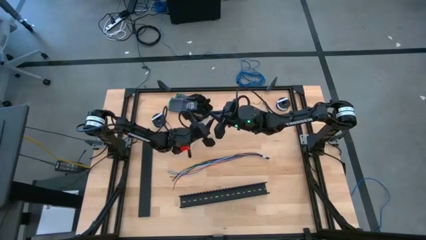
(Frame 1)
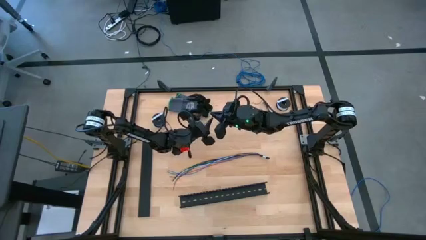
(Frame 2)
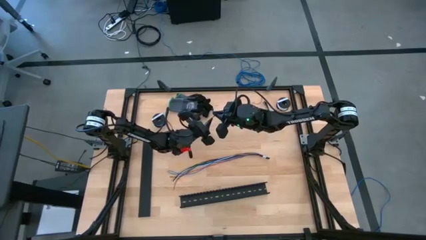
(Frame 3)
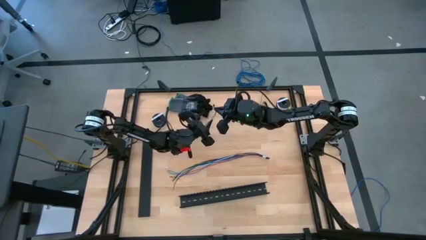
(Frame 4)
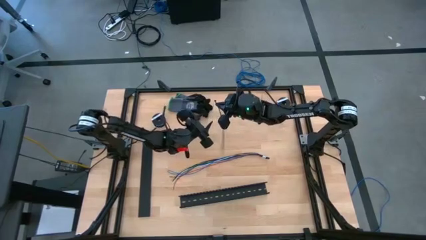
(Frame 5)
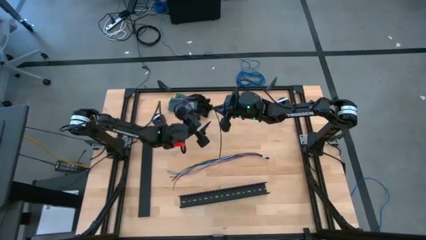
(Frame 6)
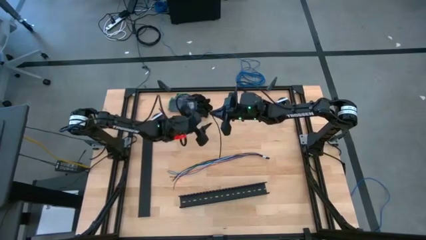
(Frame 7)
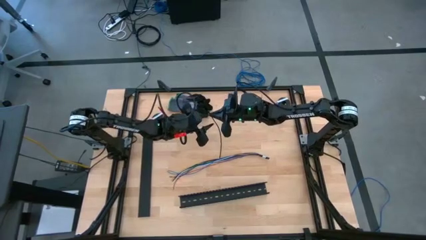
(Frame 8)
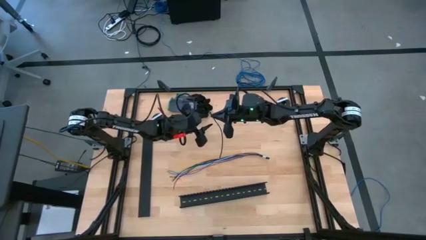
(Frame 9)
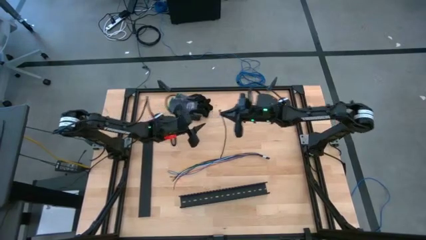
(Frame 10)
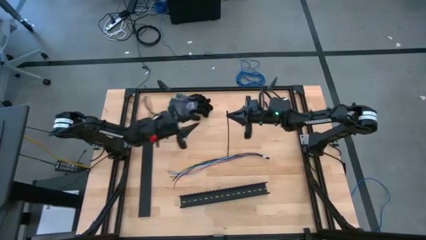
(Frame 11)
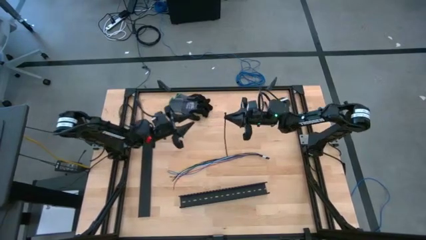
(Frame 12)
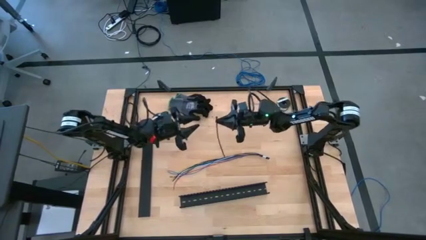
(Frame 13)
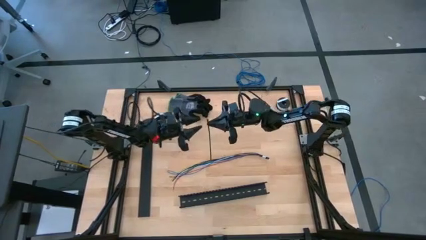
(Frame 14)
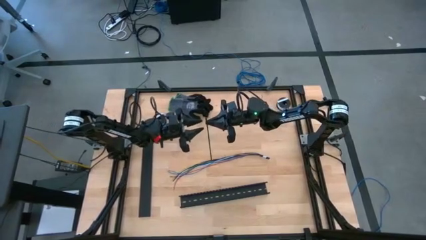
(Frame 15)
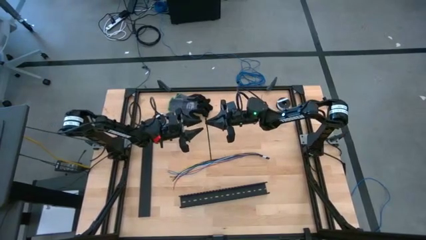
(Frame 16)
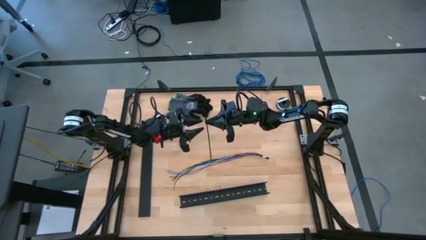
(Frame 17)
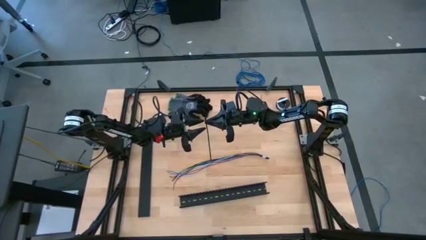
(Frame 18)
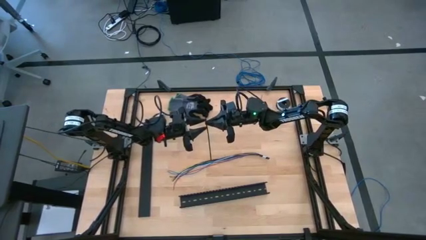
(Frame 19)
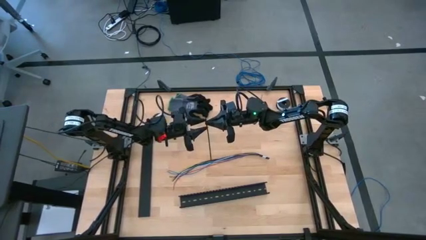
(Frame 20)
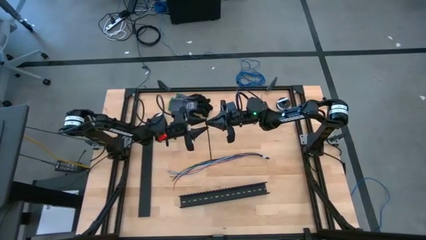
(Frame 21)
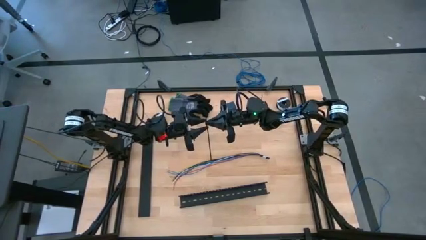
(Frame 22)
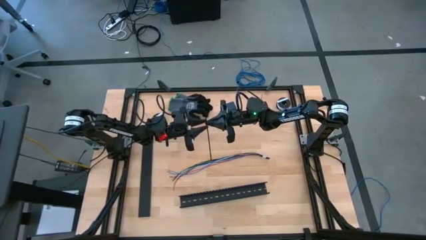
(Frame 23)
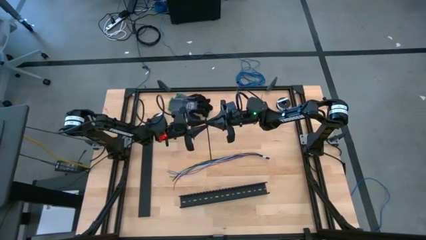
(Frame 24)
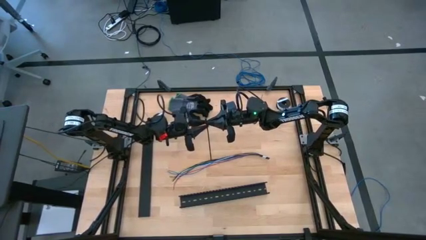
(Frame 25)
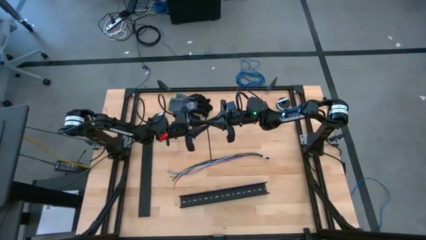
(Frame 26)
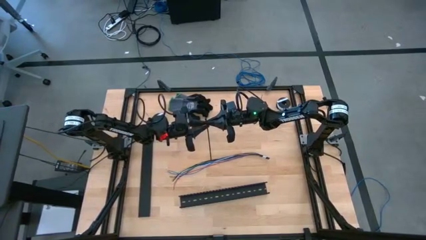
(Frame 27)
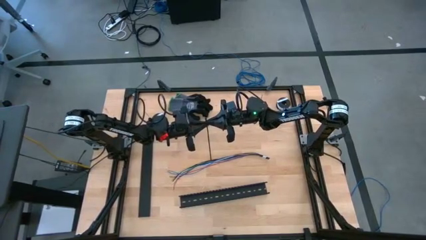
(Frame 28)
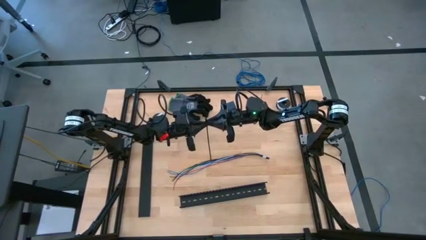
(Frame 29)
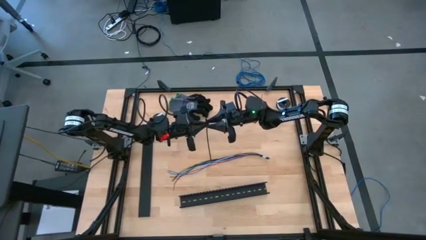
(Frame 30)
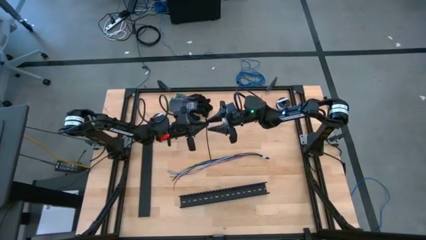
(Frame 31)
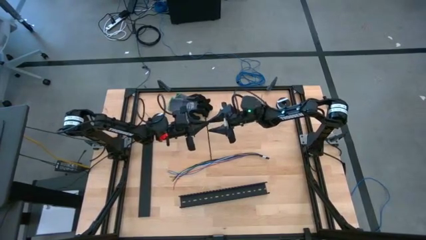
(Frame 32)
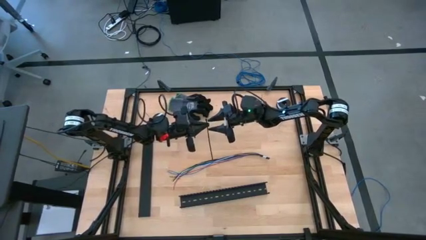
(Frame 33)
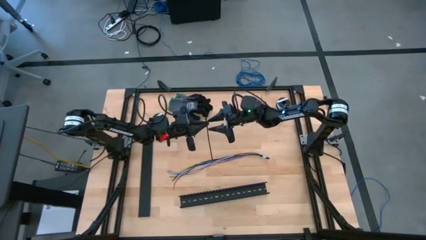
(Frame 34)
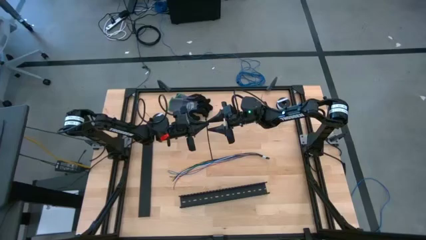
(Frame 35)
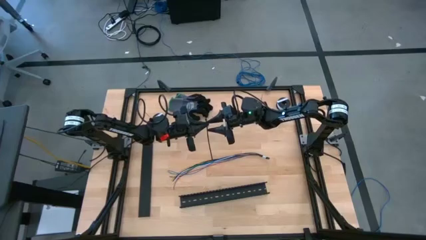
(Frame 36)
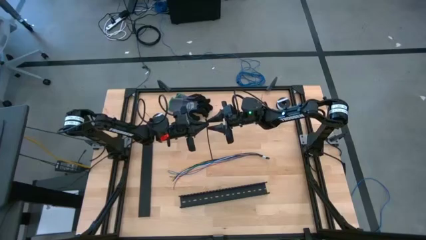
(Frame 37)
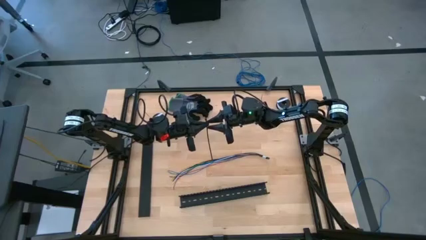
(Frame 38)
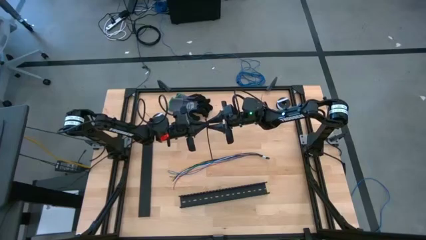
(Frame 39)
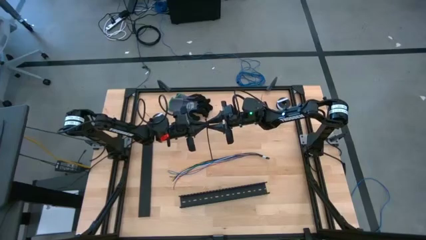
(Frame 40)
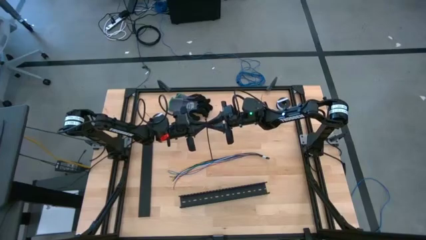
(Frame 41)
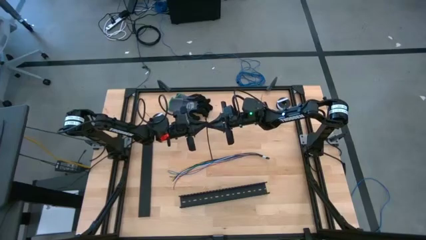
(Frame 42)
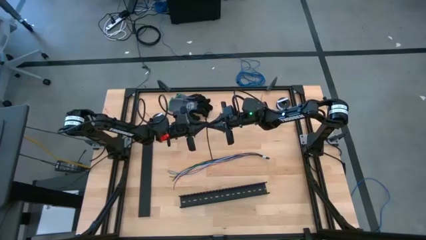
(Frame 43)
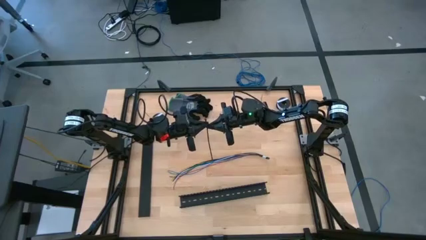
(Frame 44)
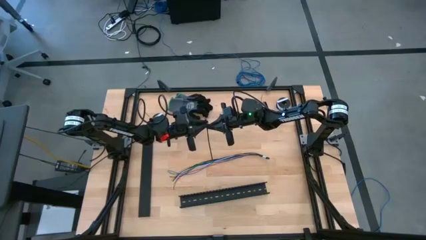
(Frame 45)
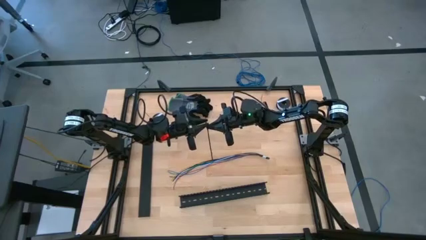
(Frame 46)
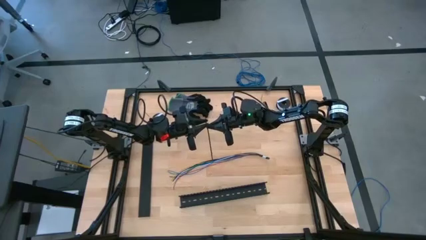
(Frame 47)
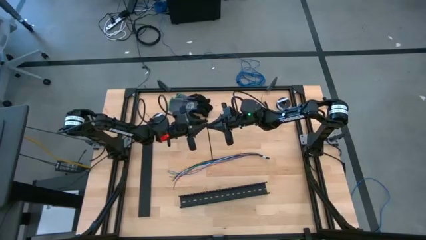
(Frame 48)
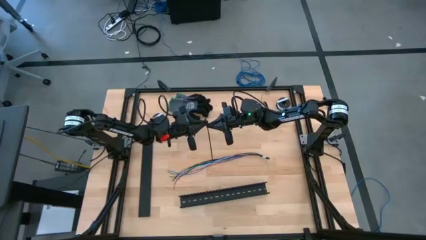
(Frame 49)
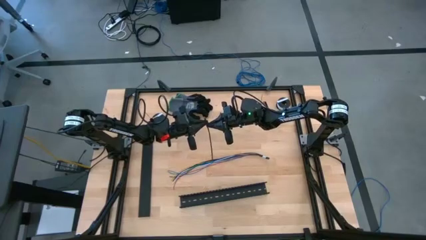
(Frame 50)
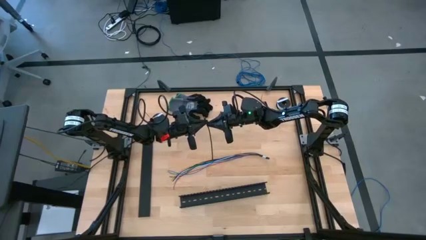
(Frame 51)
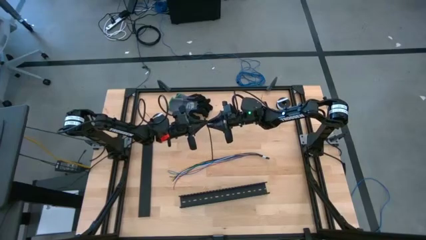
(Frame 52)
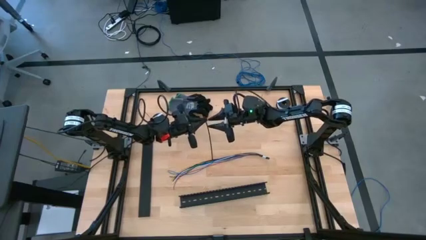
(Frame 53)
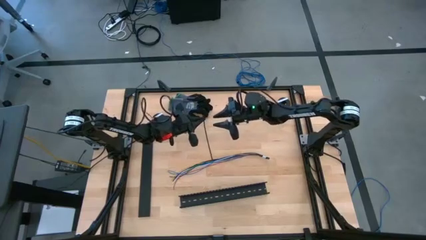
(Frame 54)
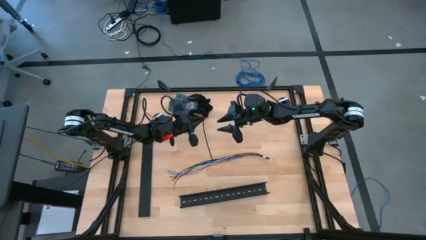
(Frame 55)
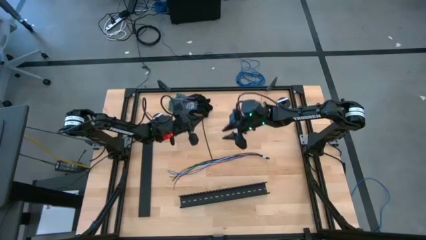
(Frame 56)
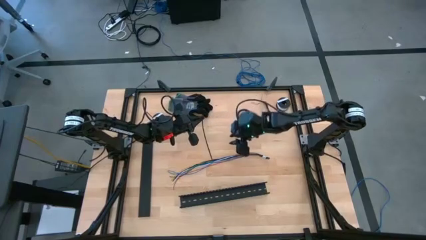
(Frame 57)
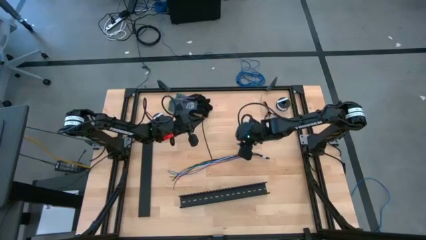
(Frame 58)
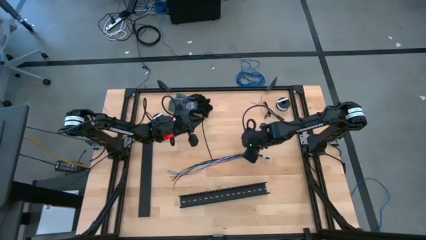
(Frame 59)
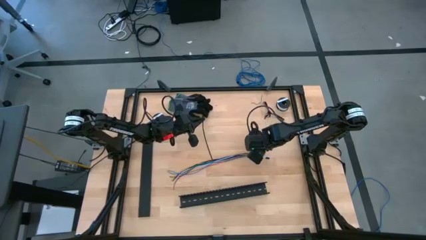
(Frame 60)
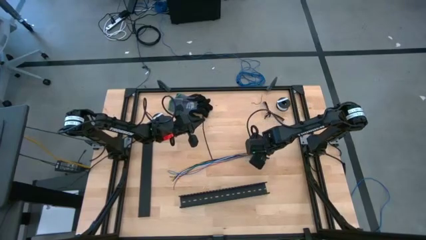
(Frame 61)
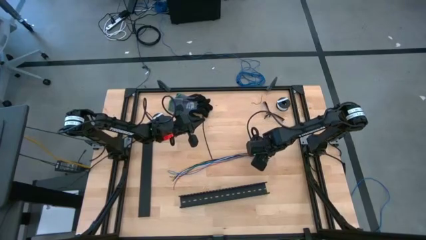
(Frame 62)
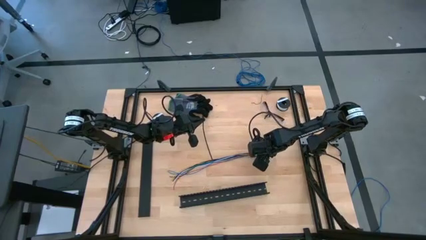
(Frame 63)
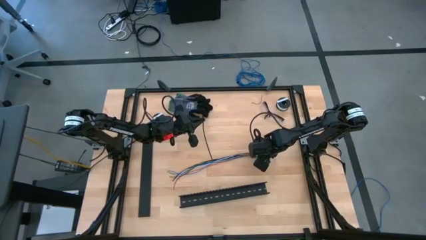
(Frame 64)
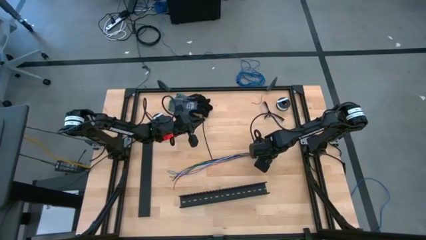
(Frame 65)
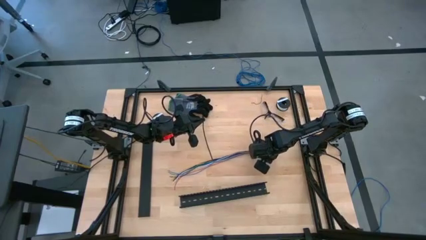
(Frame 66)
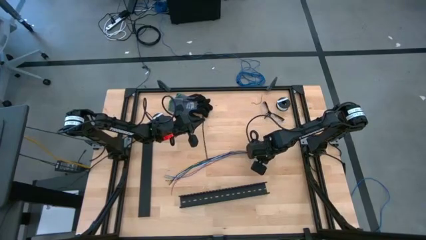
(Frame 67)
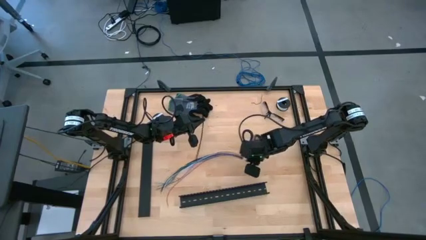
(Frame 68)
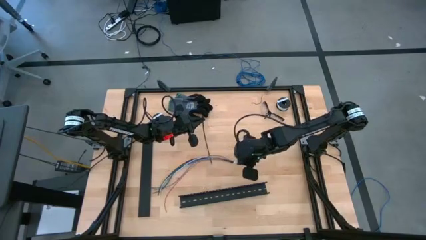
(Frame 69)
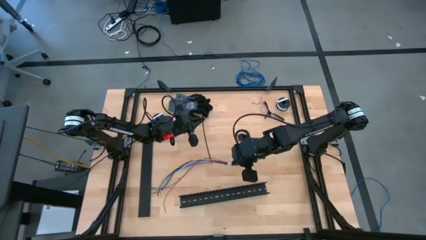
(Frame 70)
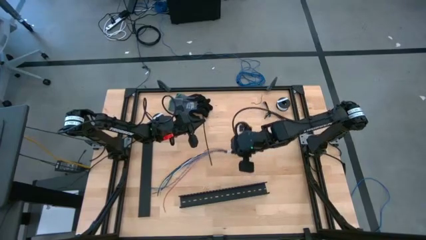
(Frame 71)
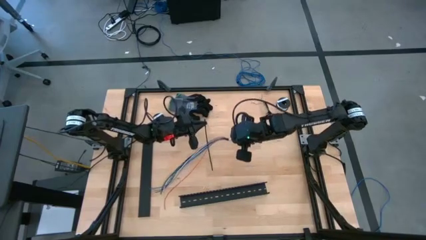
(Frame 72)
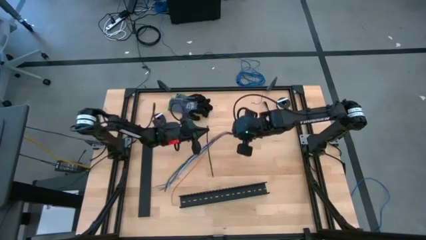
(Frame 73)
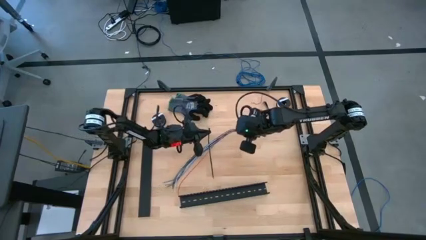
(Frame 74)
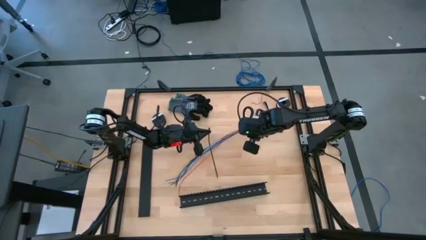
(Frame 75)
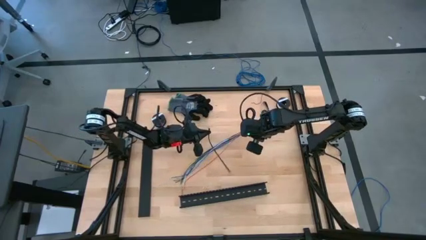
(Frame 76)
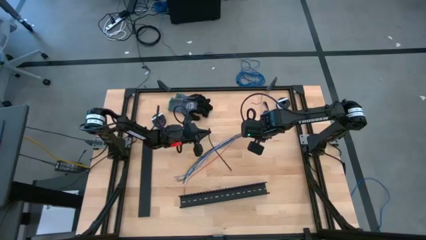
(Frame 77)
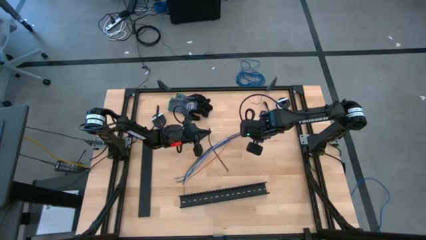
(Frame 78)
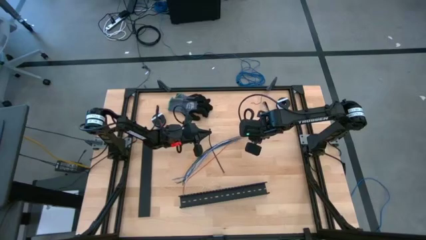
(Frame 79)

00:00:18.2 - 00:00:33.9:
Task: Ziptie cables
Wrap the cables together using the black zip tie
